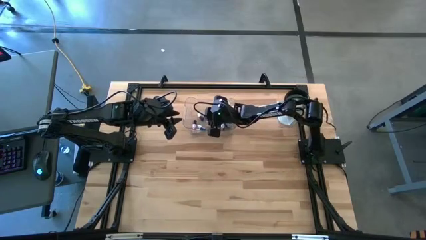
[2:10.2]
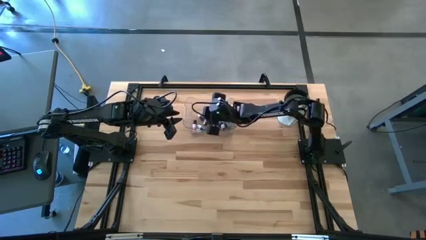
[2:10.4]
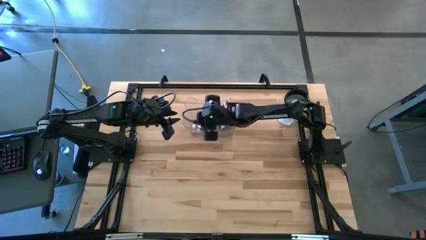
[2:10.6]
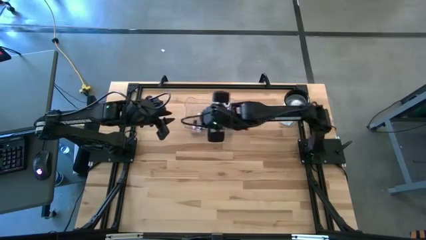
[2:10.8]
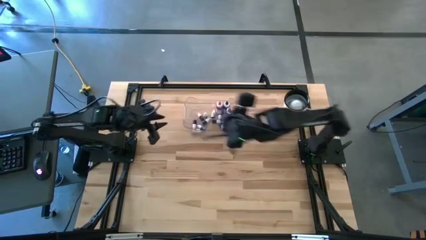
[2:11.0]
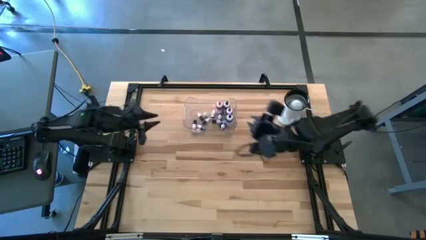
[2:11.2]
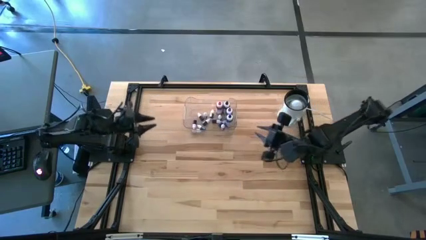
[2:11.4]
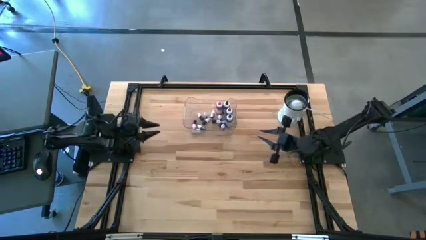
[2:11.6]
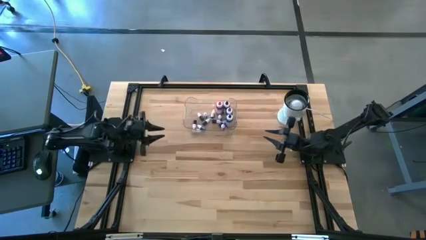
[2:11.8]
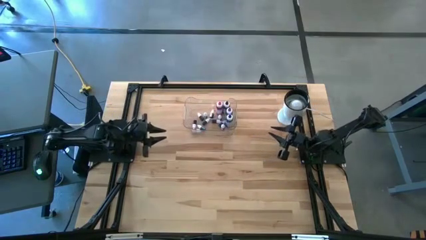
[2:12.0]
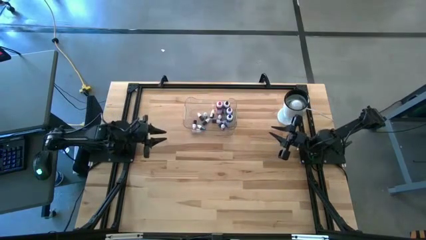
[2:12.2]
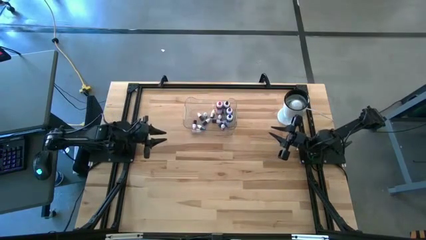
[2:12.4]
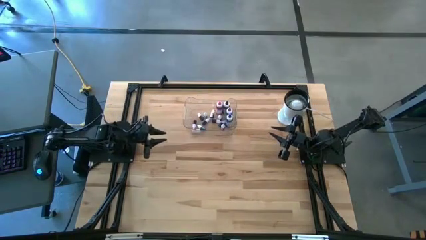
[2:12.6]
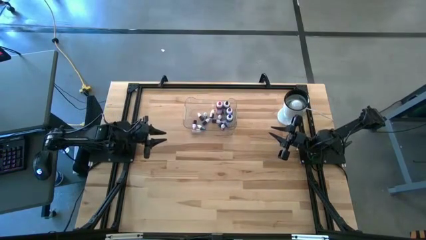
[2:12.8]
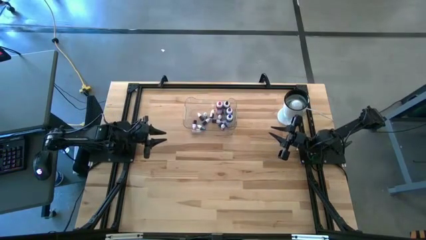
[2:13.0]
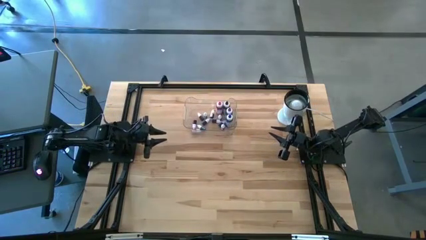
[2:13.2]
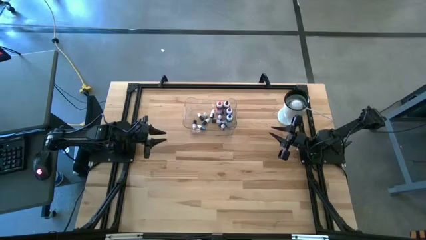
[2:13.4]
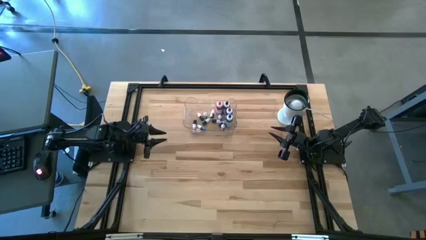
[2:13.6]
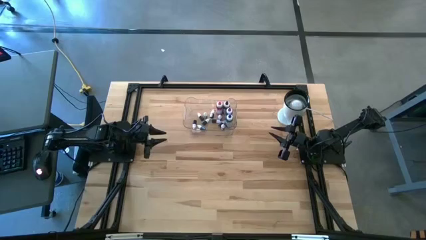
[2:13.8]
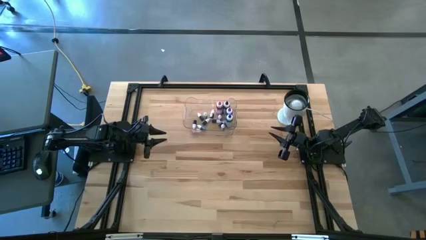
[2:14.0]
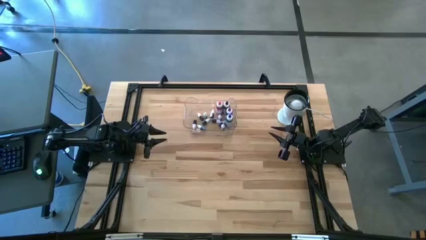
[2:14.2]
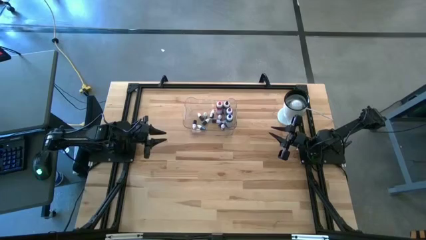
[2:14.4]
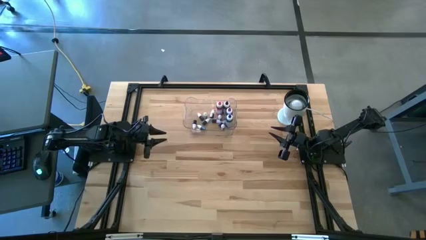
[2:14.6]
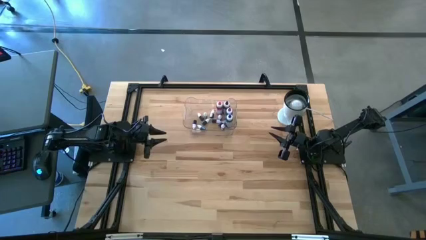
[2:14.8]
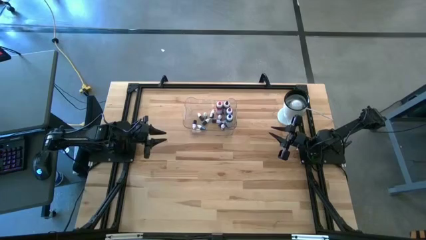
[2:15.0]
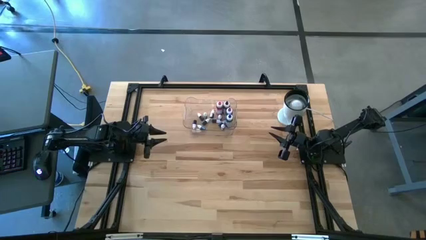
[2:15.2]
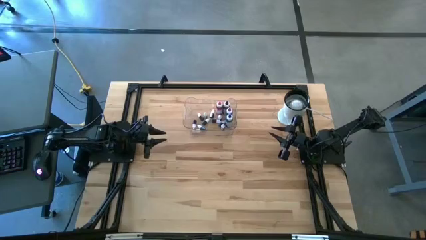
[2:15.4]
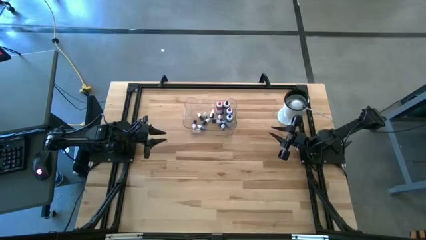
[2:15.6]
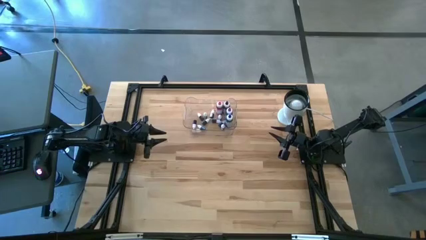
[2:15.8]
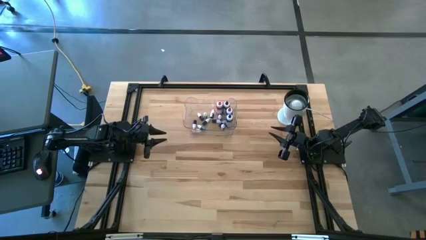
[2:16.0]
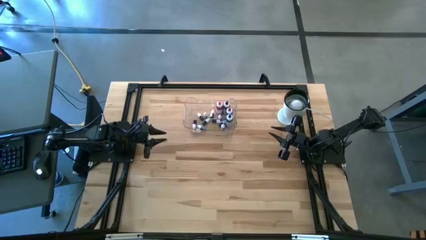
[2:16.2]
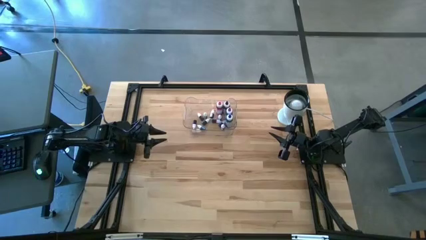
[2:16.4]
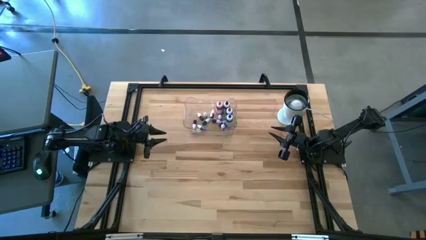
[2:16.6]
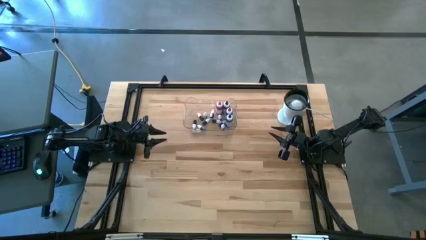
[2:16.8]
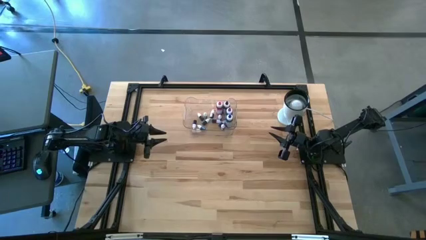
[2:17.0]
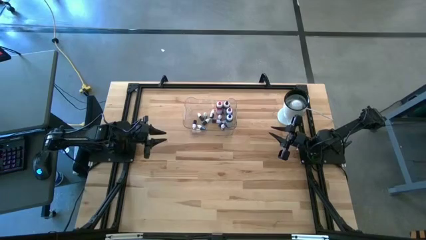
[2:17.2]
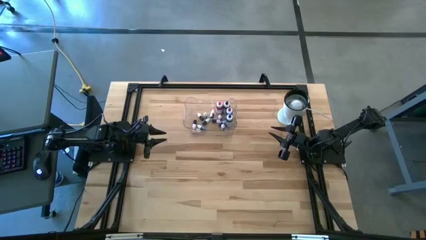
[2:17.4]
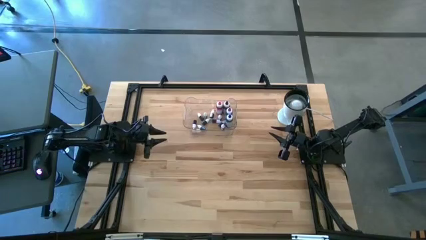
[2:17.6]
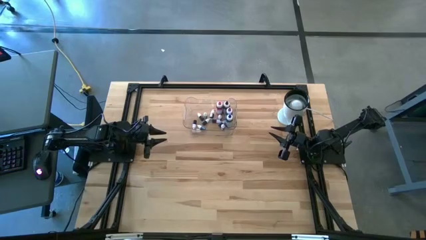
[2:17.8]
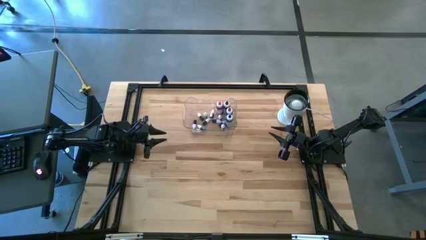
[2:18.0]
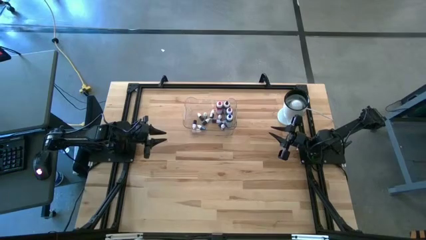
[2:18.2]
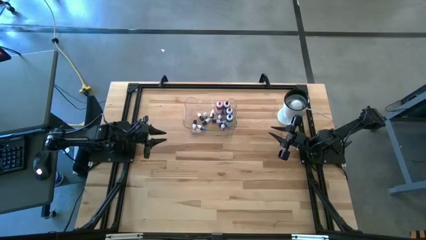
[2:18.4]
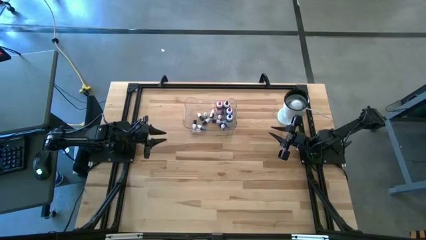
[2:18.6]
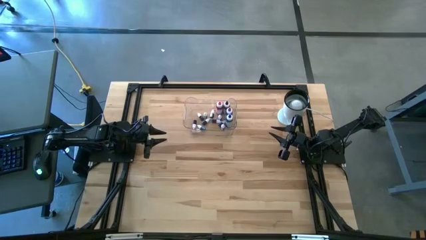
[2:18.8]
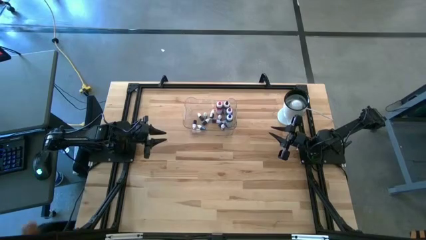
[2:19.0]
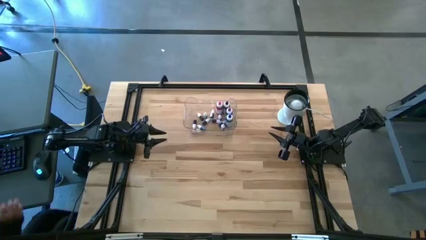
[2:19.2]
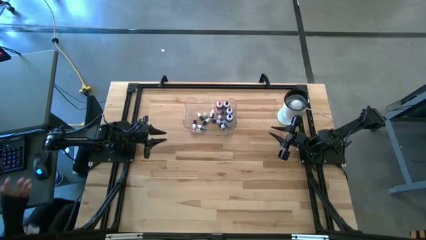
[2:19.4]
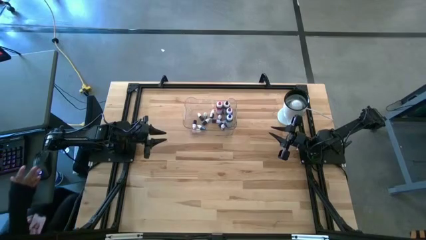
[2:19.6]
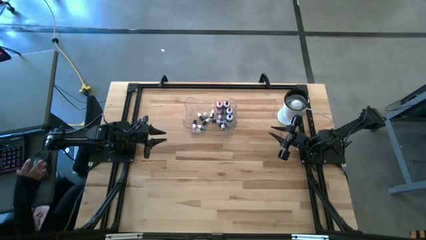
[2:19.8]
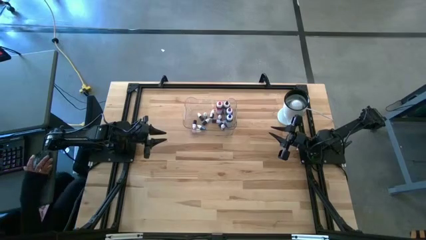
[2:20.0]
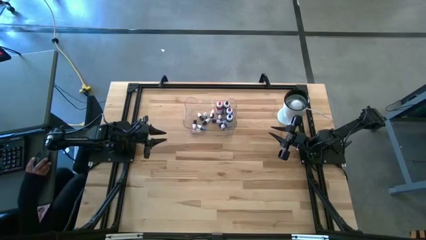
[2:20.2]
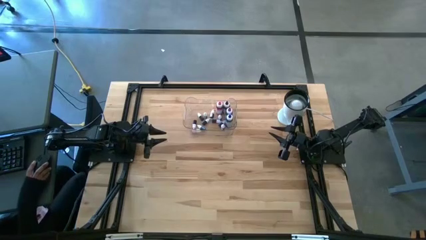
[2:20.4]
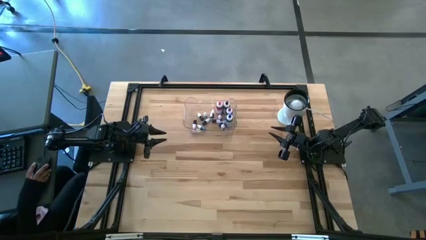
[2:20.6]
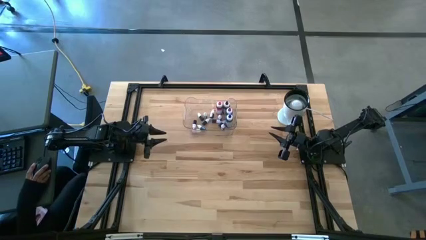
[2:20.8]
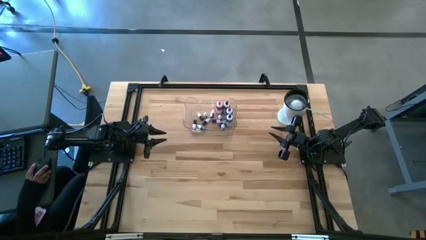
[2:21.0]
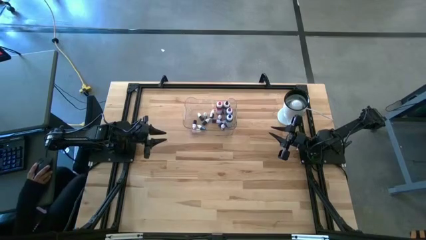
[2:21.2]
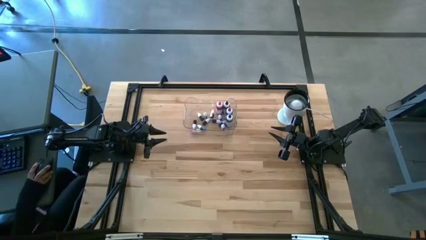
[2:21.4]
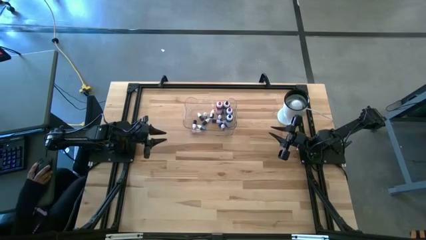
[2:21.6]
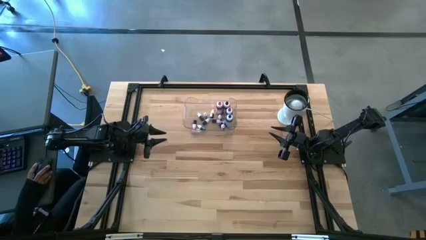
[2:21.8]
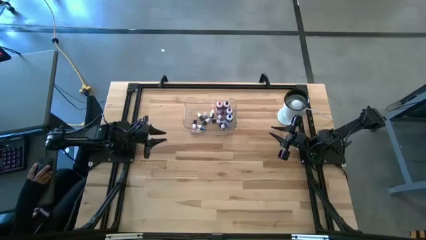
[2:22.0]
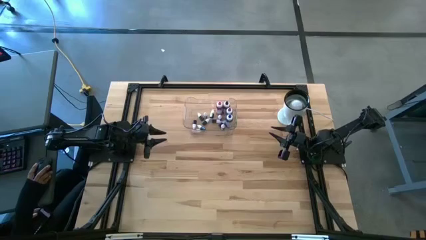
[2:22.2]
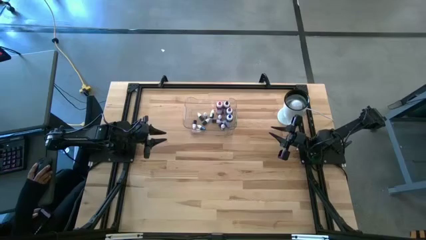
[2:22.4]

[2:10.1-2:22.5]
Task: Pick & Place food coloring
Return to Home Position

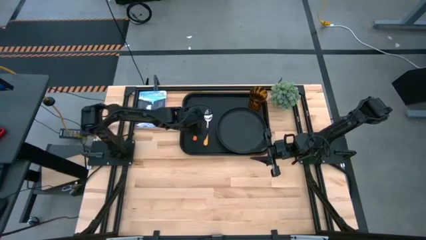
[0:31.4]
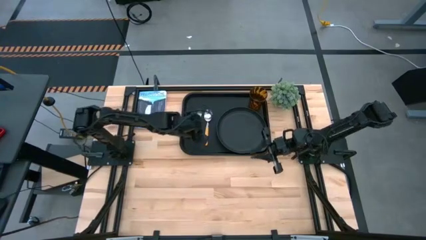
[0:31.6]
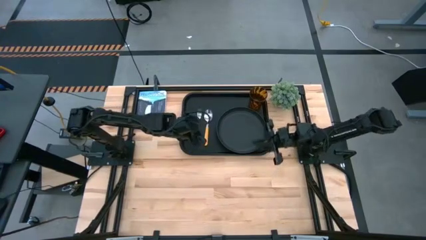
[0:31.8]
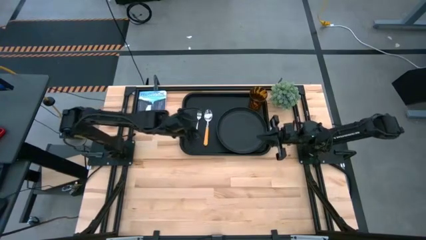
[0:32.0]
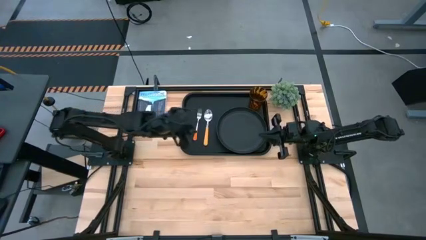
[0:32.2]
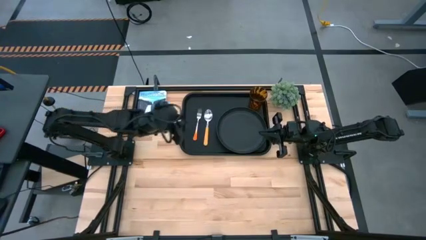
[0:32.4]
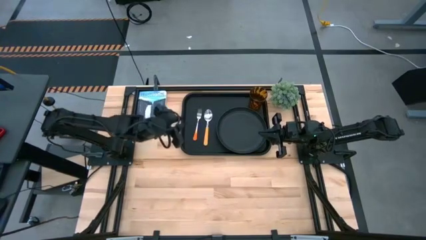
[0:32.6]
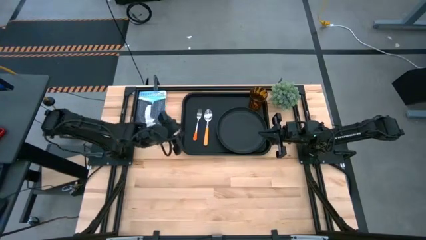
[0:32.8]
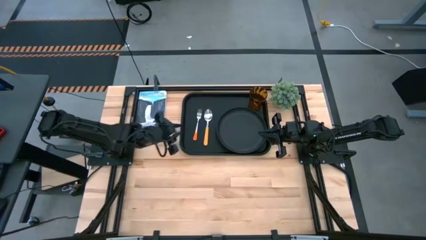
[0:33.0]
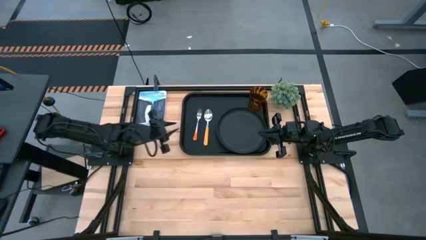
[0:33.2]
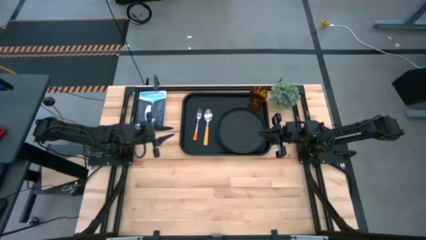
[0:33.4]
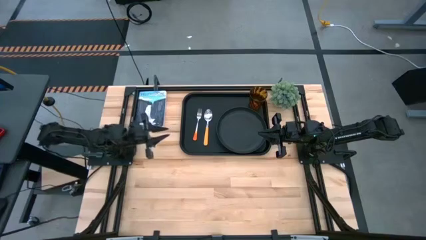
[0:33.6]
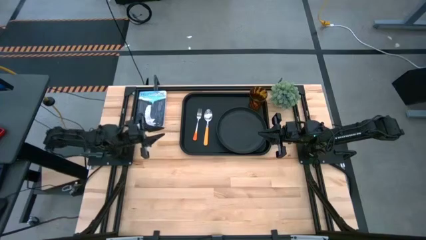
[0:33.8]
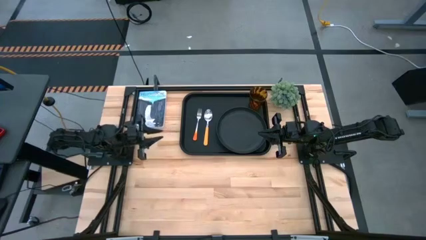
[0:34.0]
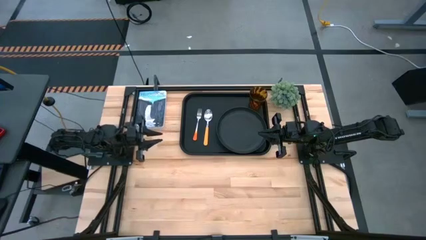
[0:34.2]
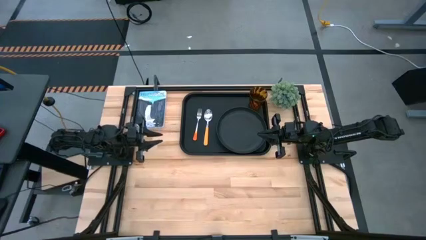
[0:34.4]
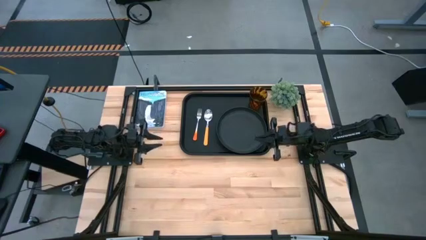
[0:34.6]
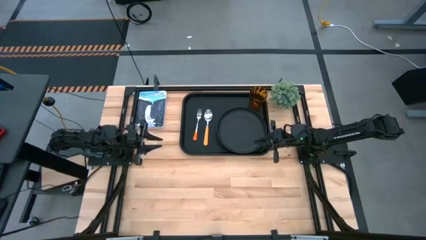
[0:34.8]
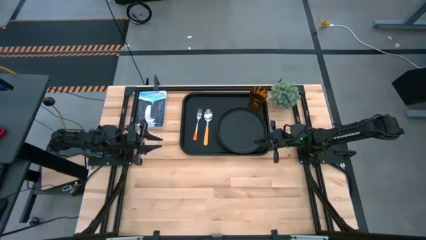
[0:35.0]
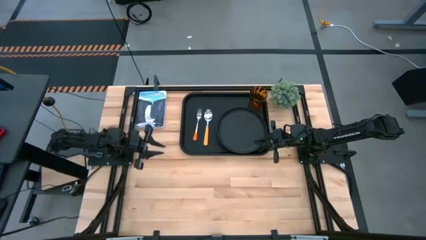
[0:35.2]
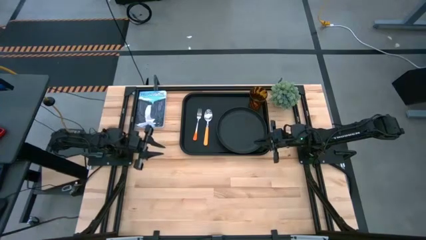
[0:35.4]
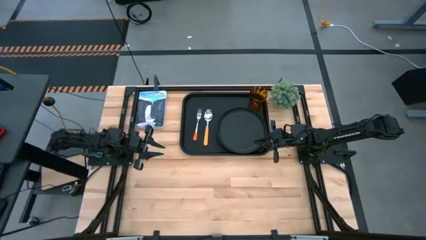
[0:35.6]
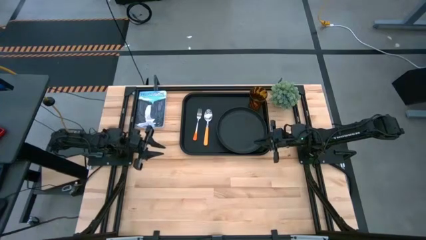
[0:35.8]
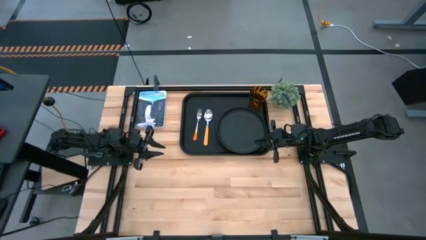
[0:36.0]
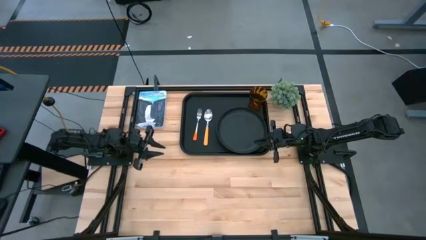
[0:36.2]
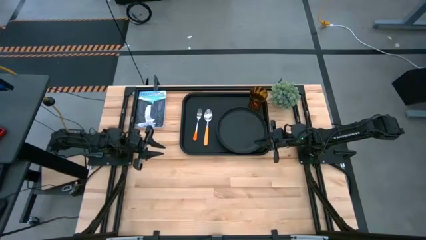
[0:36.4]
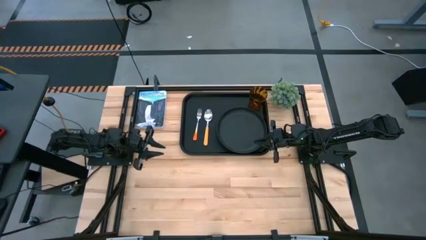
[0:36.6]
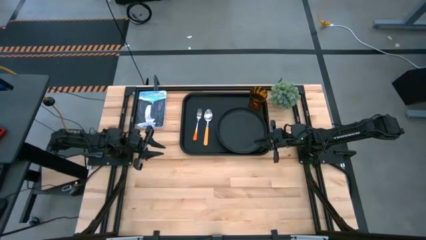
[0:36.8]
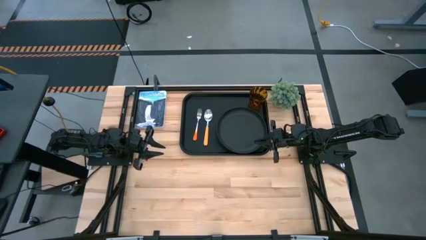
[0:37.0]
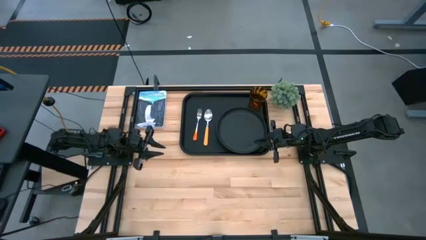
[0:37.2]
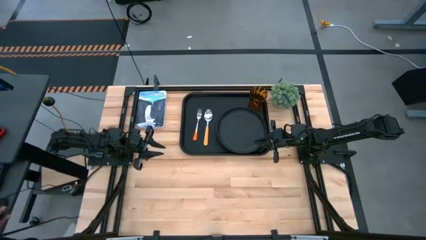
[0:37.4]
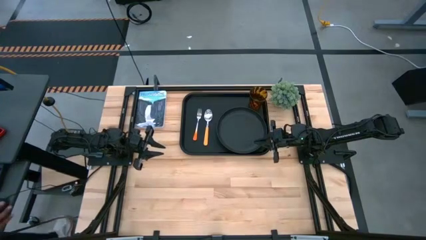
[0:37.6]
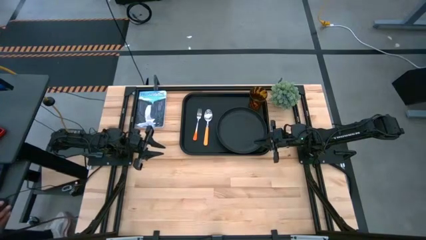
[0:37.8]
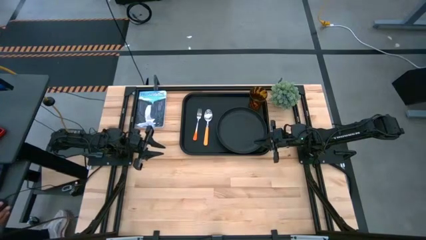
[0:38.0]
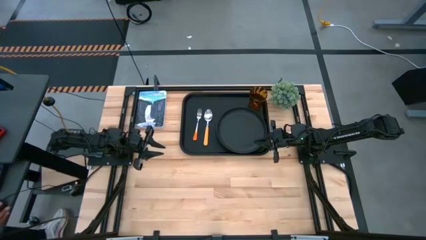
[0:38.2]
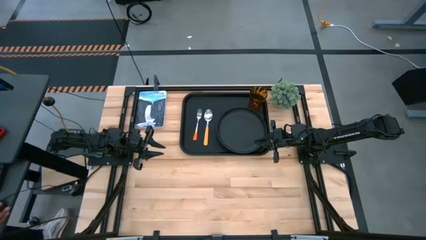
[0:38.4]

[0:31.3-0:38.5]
Task: Pick and place plate/cup/fork/spoon on tray
Return to Home Position
